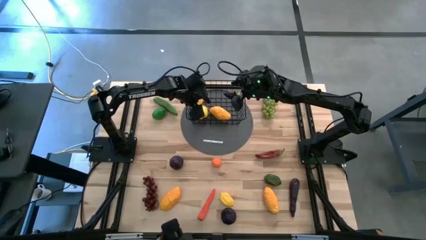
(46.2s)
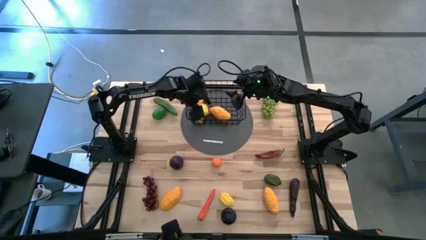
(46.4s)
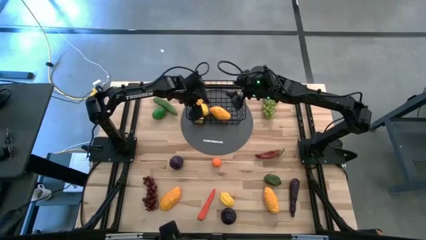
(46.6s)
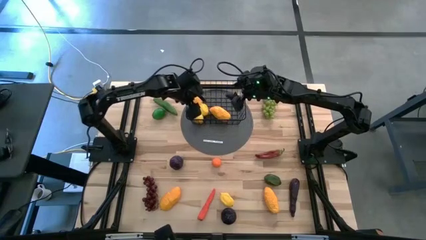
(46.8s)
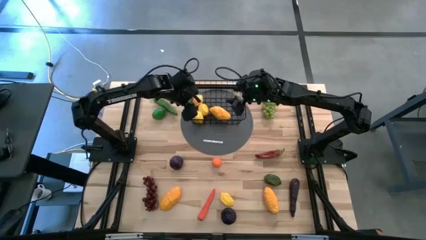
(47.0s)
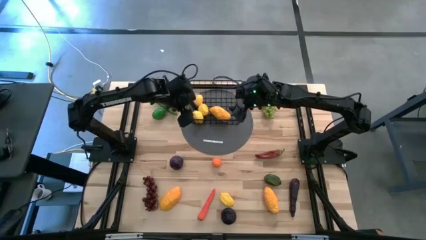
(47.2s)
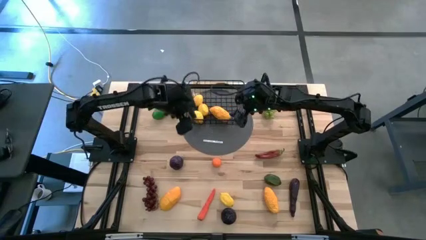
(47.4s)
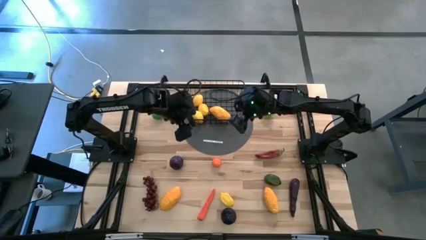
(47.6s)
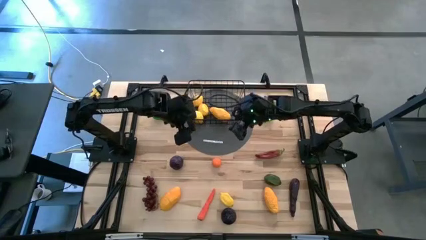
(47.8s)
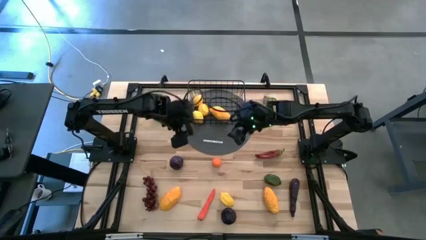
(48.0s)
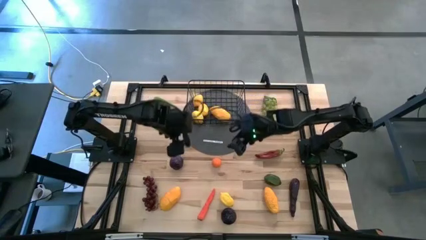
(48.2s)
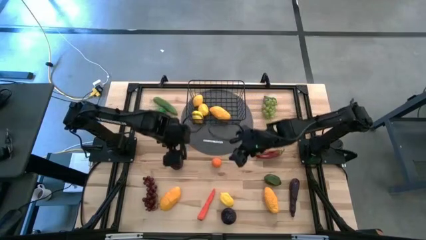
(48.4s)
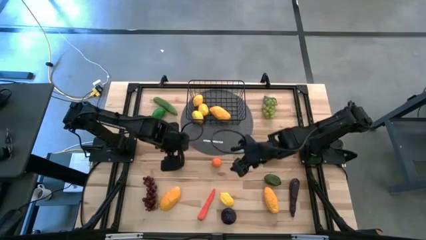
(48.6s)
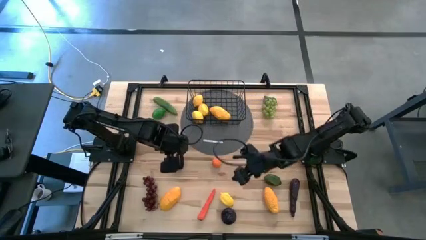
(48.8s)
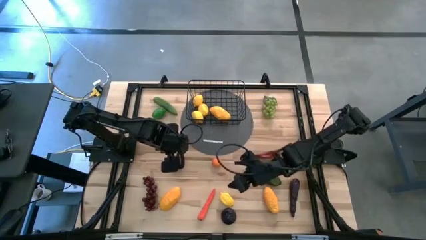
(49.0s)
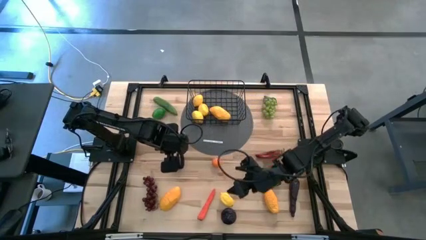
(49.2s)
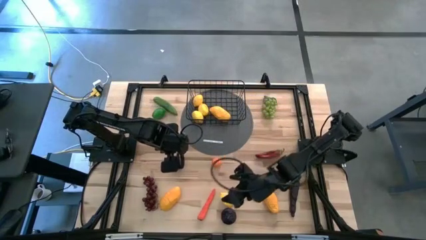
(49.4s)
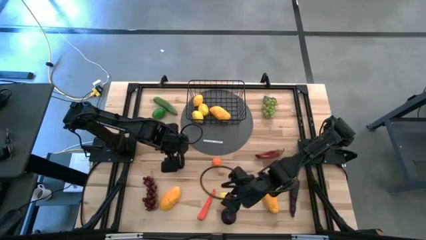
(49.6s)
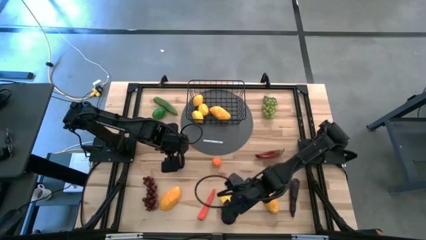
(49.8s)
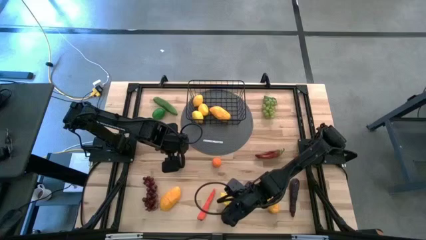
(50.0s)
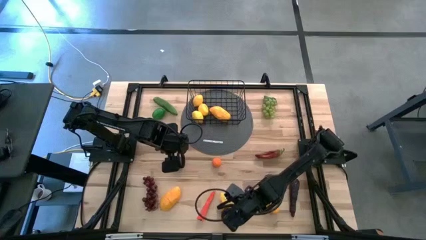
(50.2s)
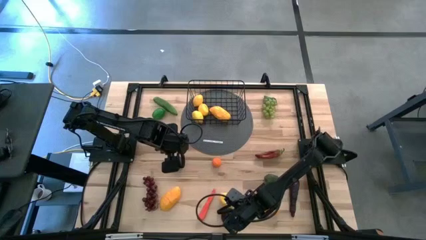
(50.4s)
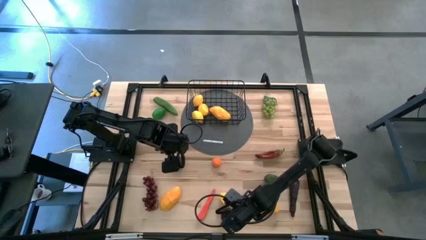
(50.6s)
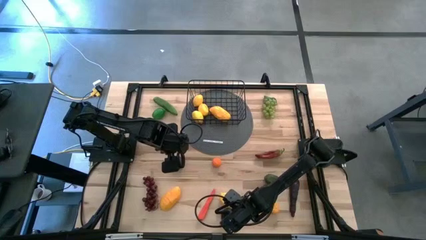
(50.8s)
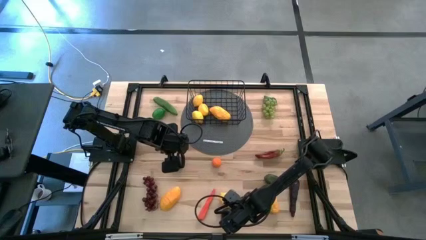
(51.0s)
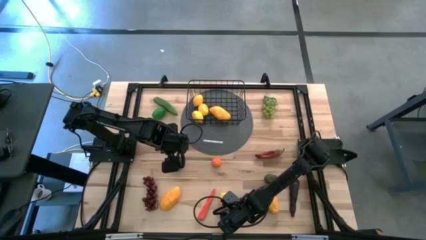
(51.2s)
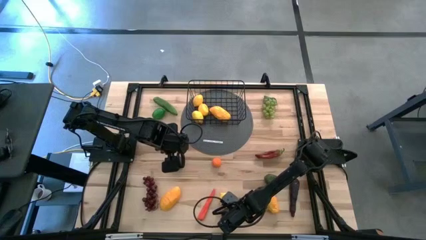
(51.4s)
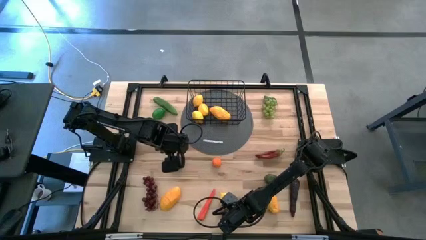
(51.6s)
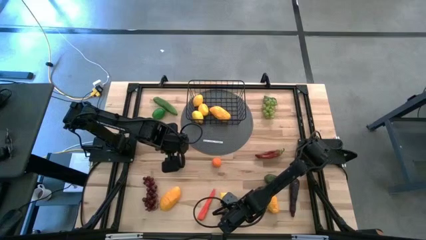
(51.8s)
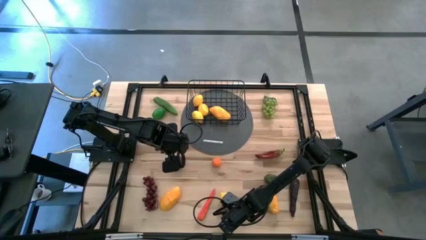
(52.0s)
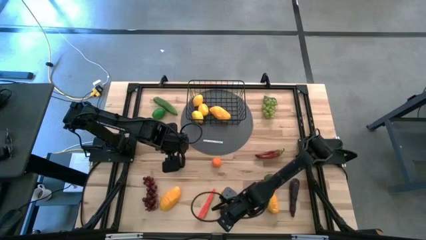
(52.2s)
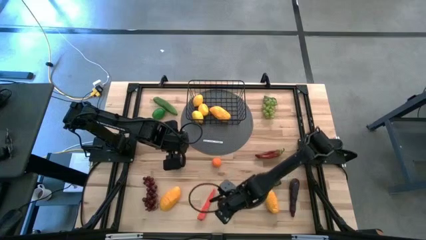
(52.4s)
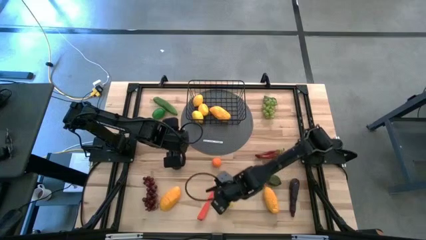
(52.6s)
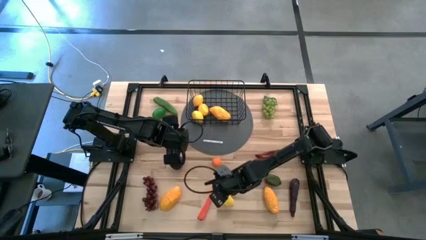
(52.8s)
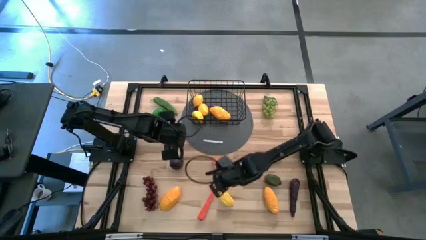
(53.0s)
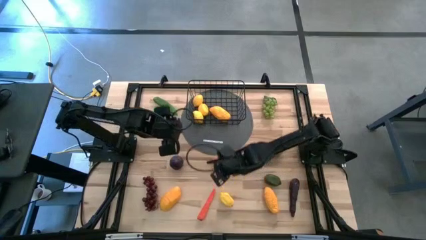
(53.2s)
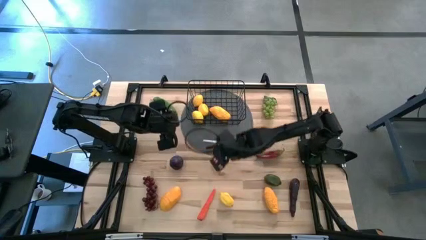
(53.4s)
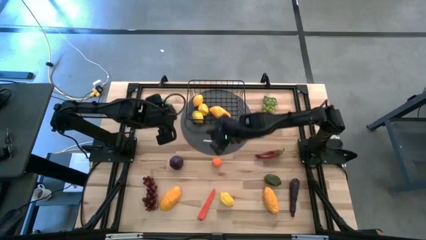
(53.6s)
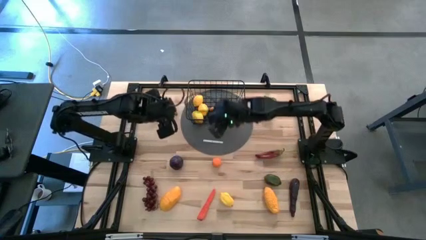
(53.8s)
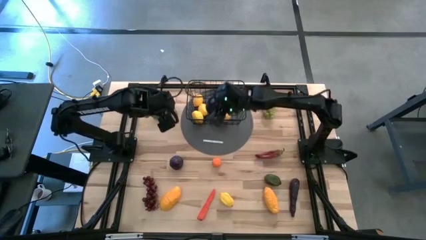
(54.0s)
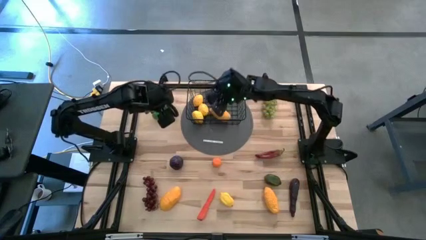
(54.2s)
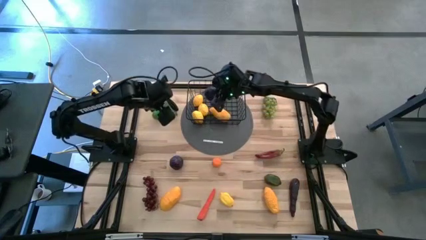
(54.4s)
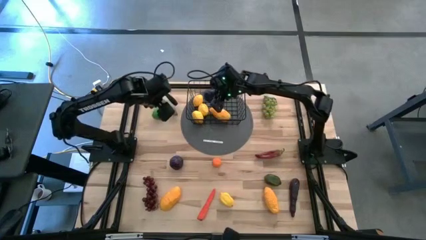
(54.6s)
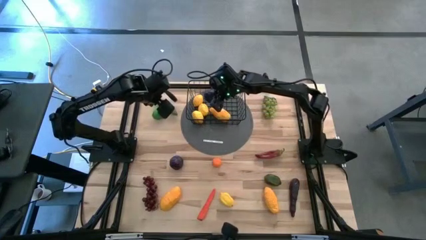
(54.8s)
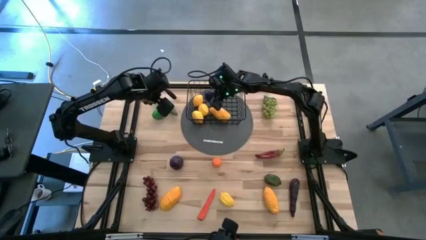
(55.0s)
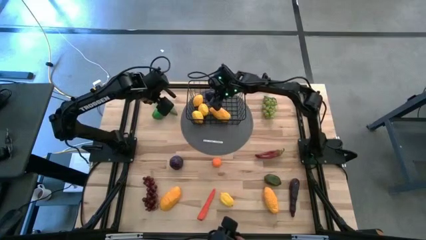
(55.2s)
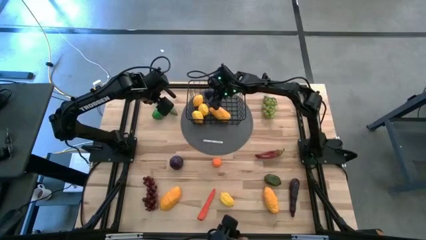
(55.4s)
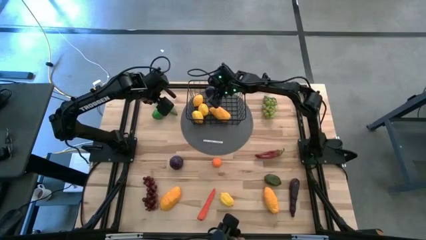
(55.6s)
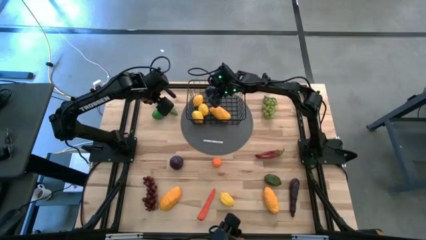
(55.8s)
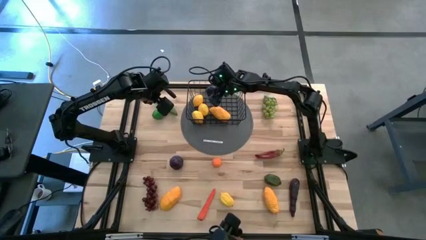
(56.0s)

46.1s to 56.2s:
Task: Build produce basket
Put the bottom black plum into the basket

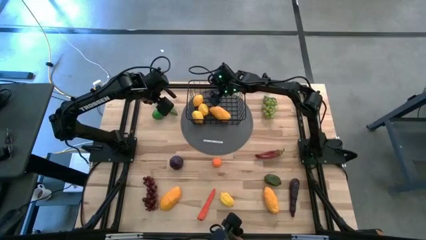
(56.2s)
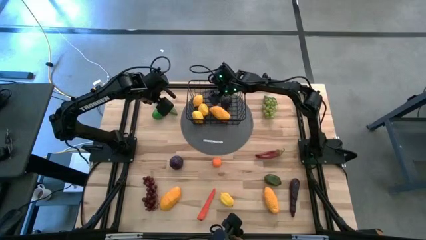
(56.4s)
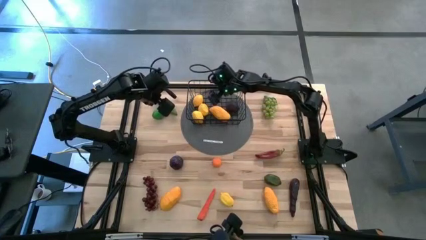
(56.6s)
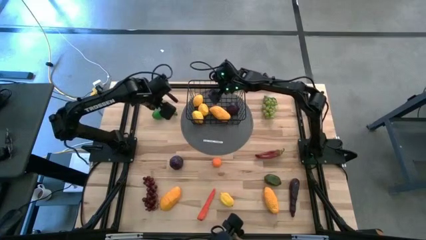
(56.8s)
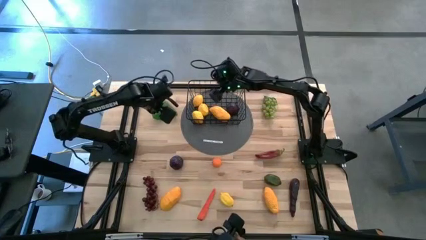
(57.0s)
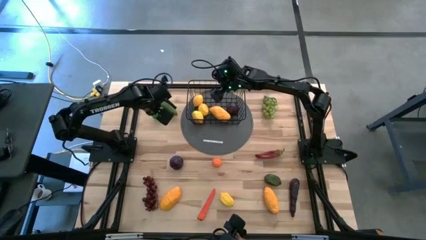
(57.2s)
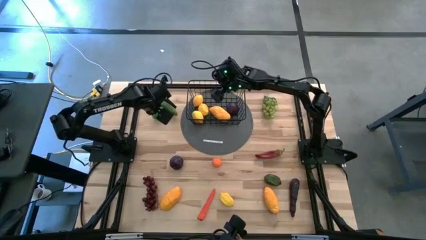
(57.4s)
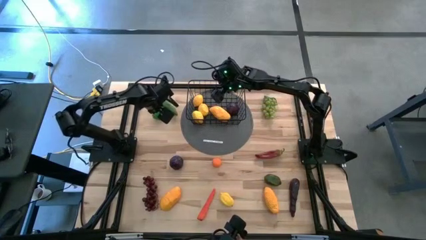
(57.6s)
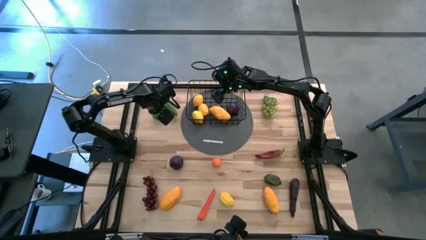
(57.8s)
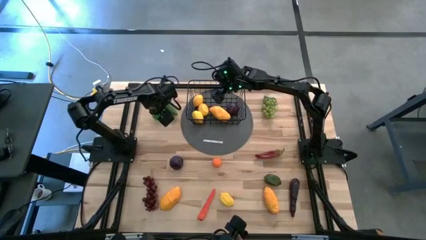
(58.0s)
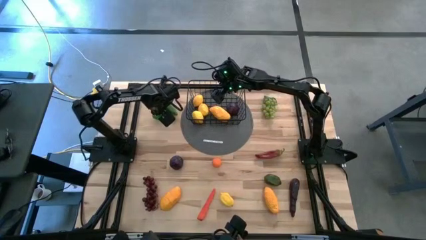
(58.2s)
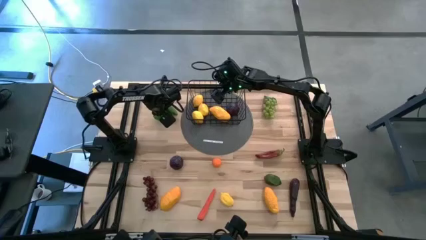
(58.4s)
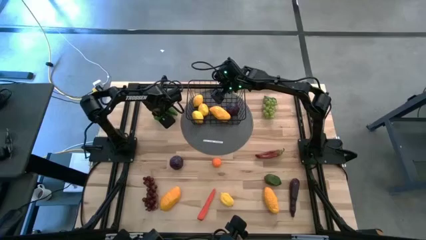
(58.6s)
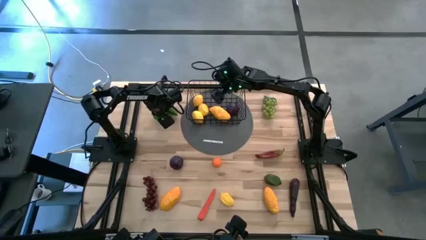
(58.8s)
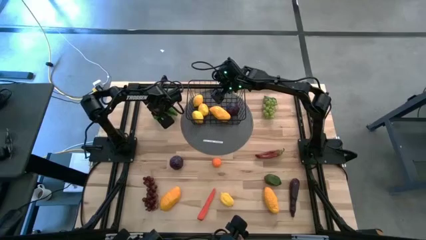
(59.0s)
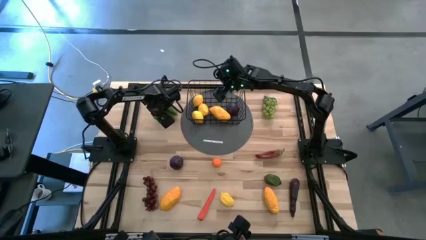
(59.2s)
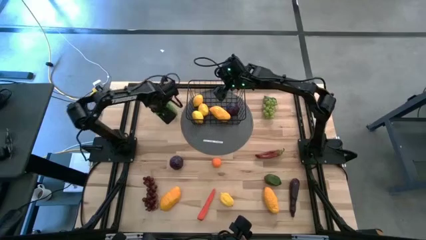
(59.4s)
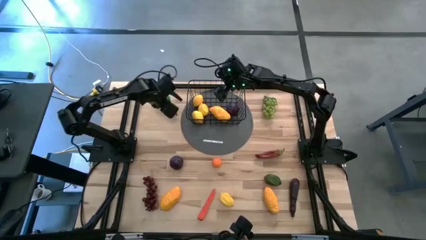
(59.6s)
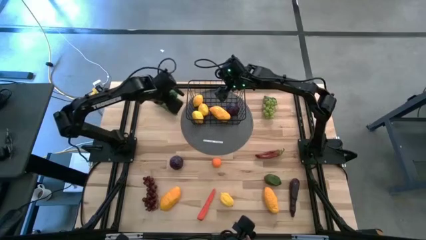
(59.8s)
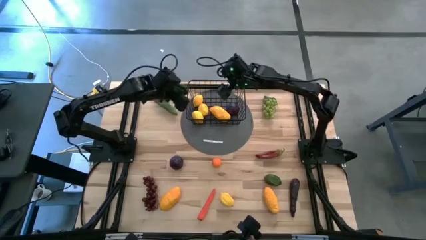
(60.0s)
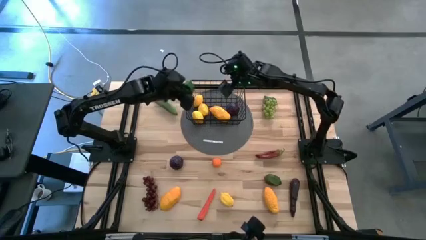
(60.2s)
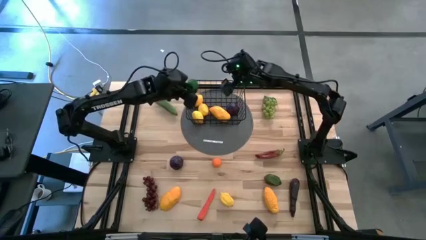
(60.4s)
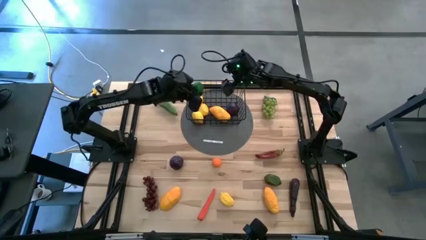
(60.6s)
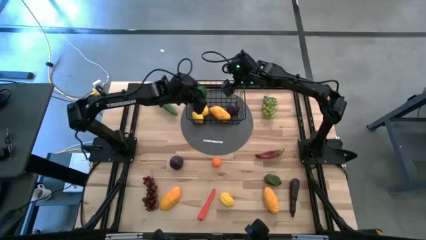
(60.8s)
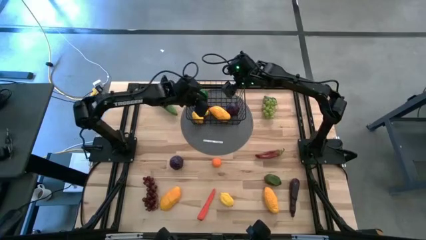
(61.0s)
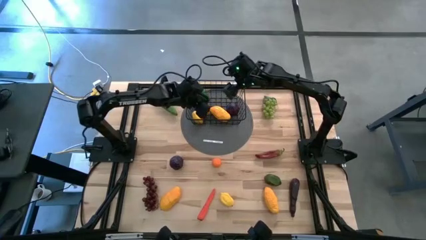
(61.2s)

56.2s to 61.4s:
Put the top green lime into the basket

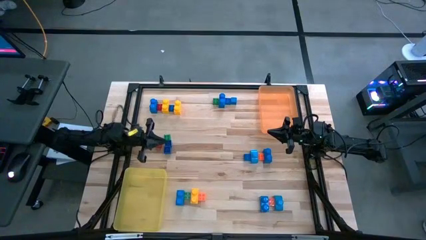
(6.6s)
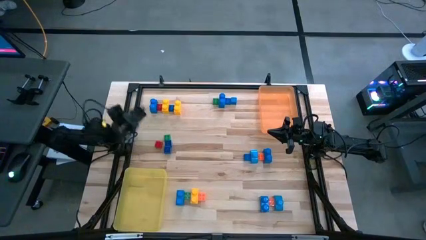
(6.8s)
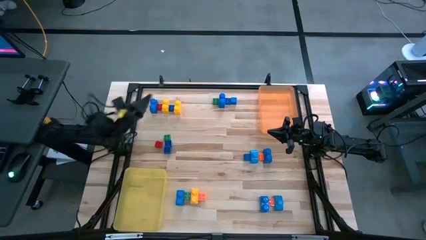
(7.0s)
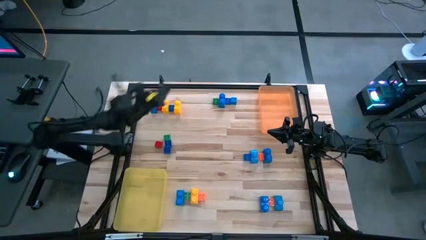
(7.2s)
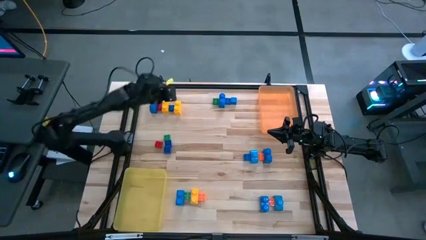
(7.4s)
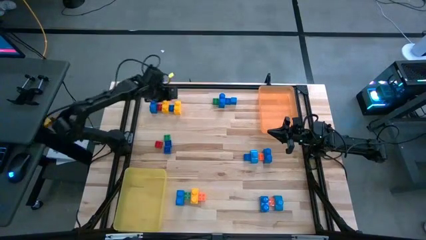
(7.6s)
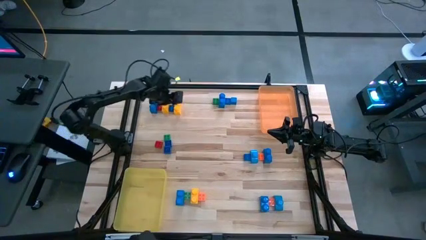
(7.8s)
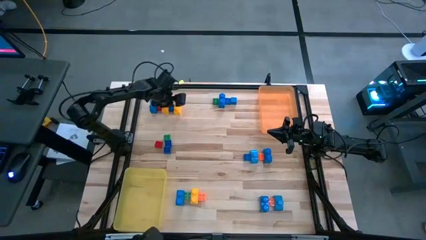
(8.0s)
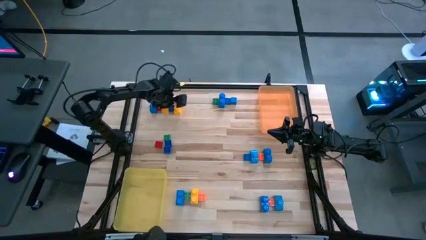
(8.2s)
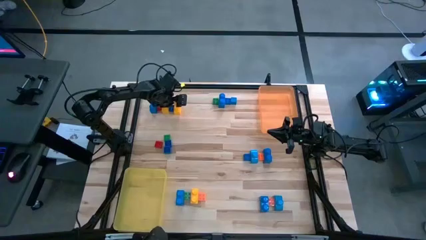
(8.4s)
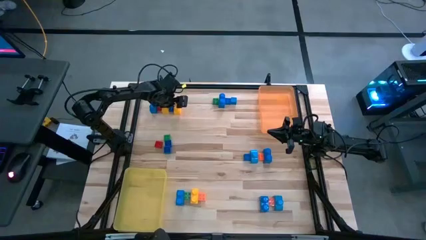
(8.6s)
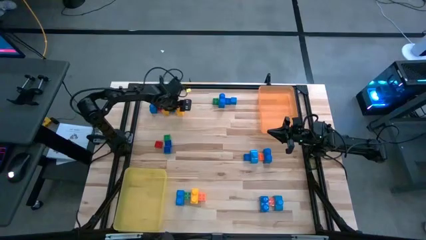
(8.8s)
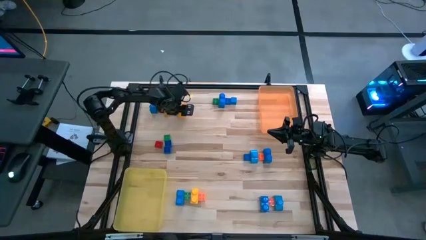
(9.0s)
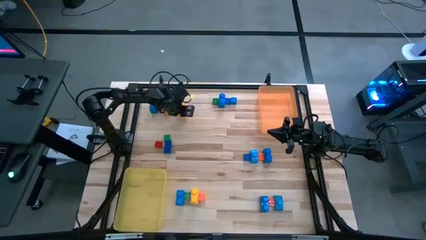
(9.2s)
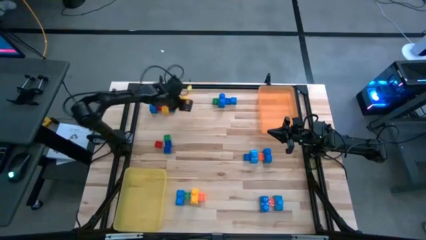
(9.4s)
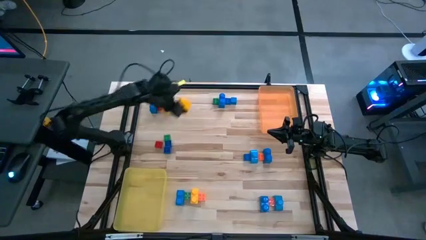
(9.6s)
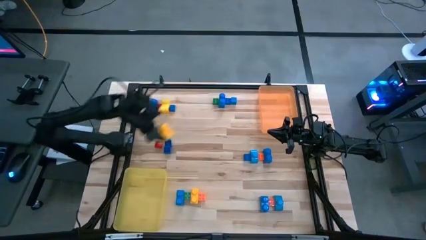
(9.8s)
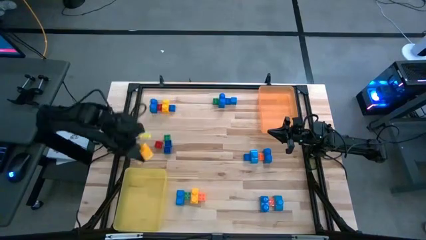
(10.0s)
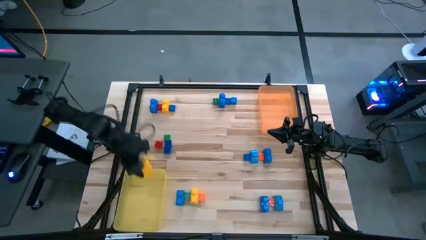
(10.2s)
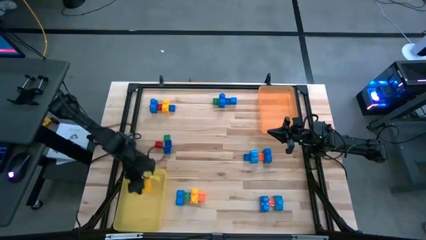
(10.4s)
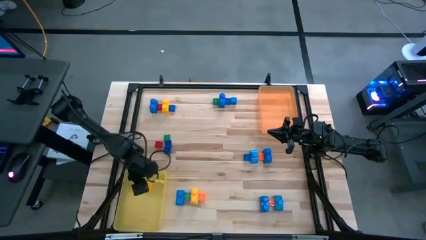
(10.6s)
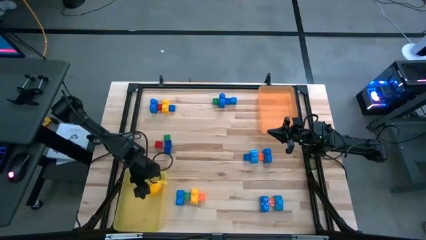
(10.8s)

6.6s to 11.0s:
Task: Sort blocks by size
Put the large yellow game piece into the yellow bin
